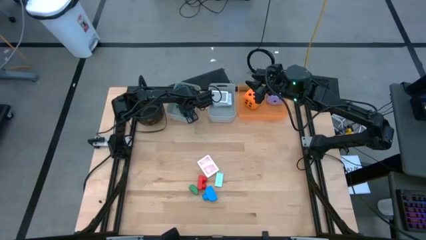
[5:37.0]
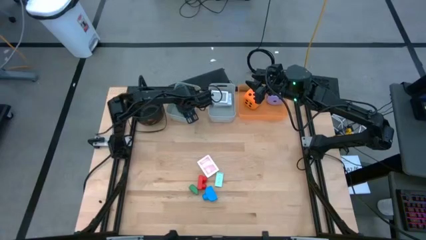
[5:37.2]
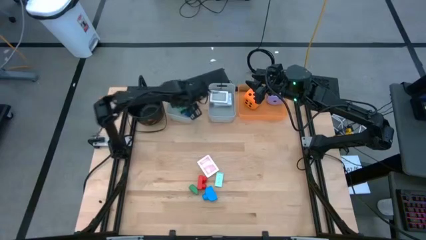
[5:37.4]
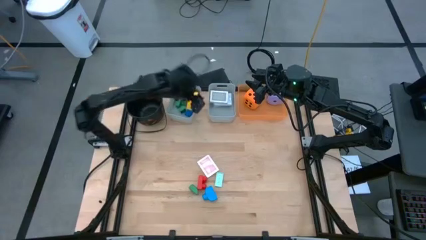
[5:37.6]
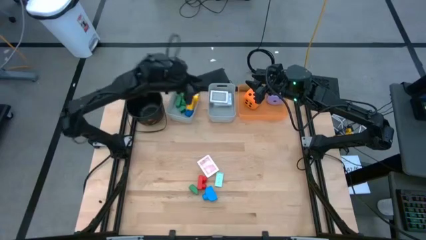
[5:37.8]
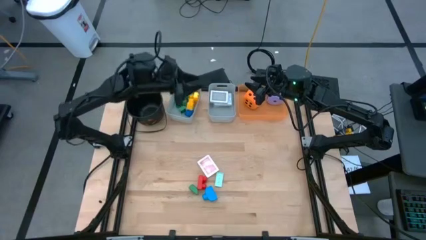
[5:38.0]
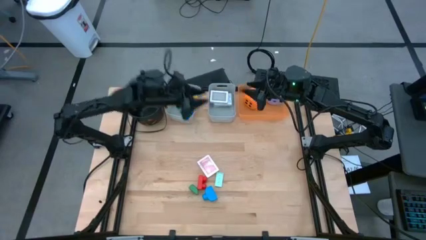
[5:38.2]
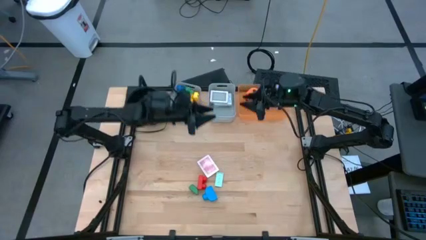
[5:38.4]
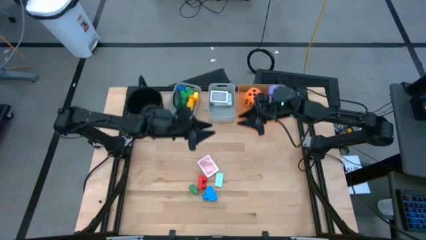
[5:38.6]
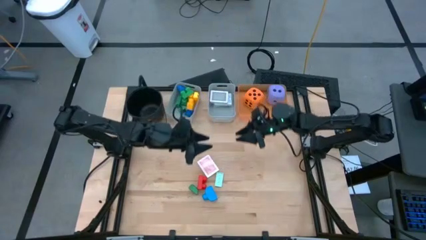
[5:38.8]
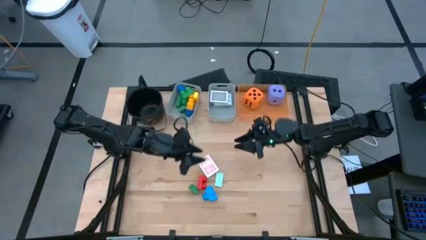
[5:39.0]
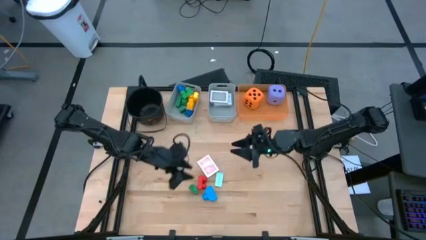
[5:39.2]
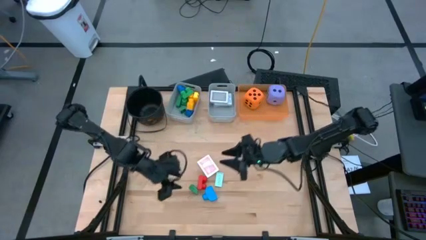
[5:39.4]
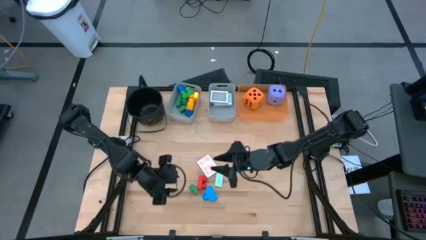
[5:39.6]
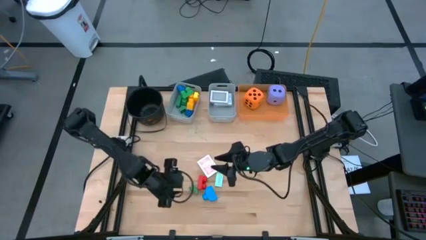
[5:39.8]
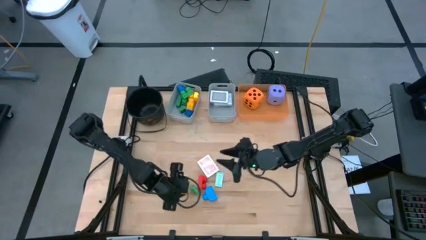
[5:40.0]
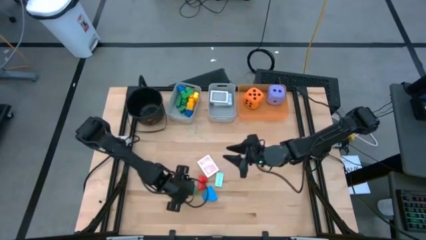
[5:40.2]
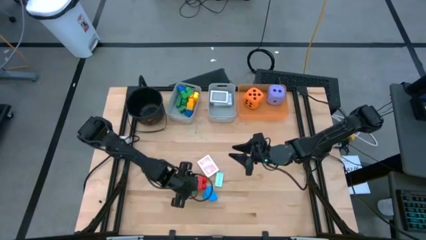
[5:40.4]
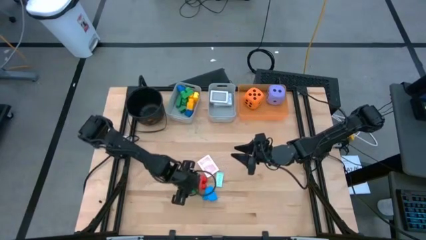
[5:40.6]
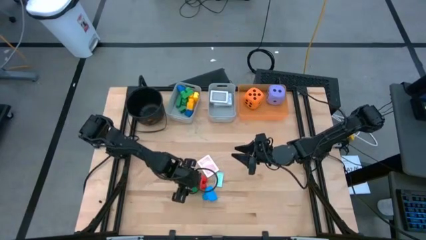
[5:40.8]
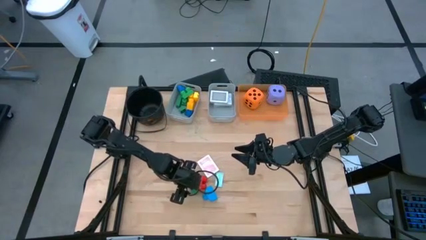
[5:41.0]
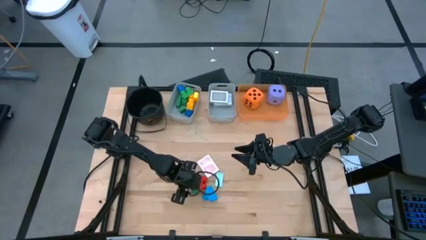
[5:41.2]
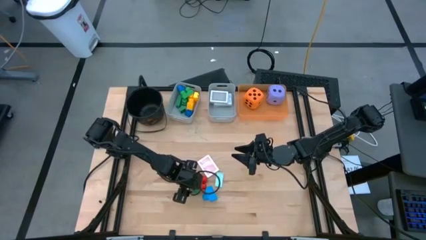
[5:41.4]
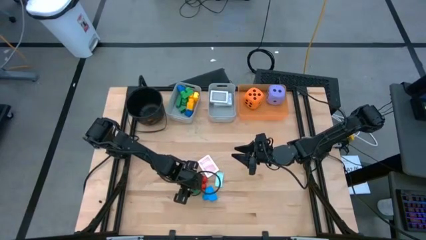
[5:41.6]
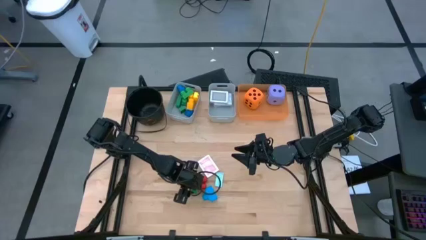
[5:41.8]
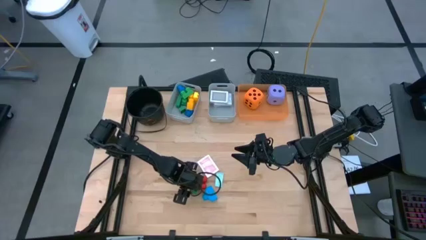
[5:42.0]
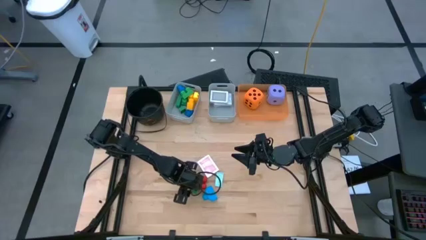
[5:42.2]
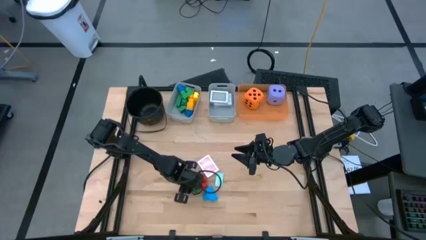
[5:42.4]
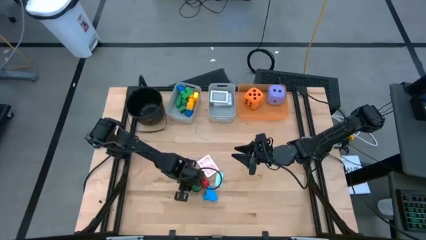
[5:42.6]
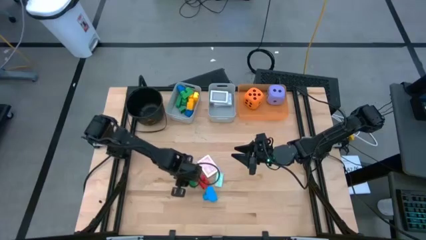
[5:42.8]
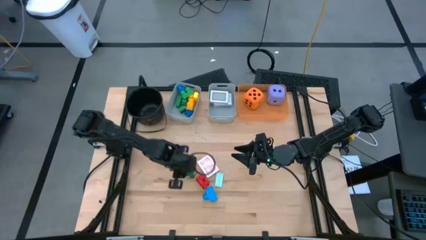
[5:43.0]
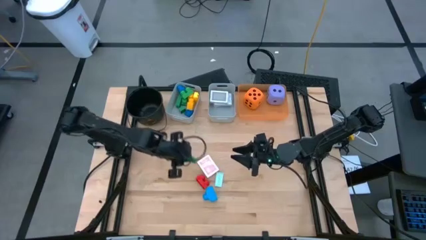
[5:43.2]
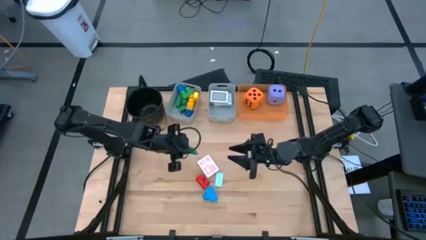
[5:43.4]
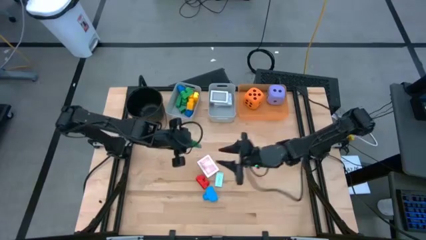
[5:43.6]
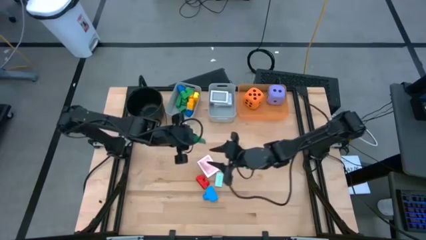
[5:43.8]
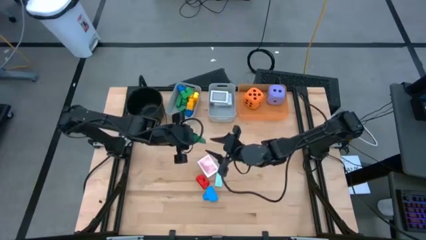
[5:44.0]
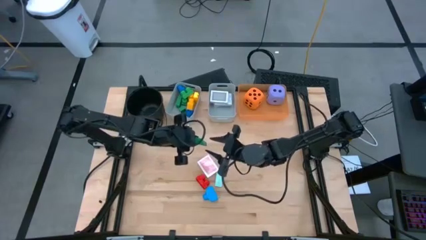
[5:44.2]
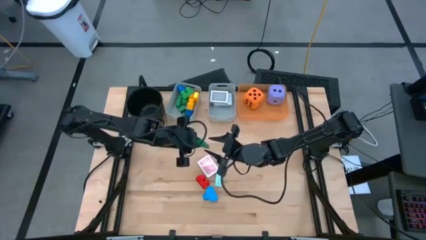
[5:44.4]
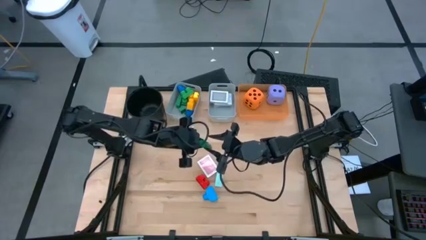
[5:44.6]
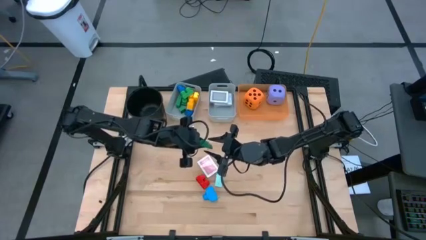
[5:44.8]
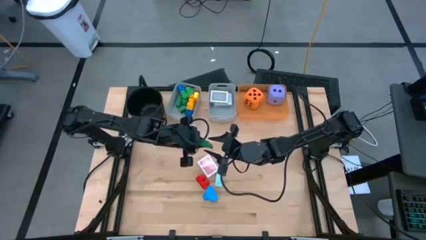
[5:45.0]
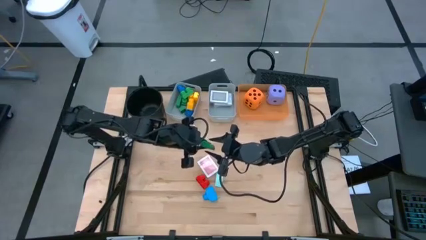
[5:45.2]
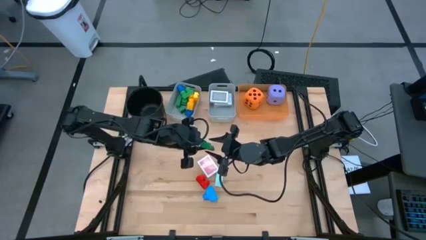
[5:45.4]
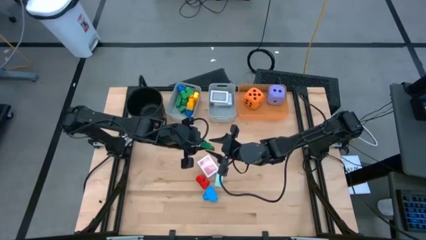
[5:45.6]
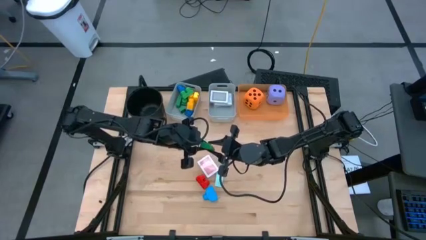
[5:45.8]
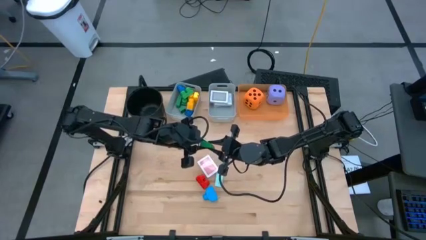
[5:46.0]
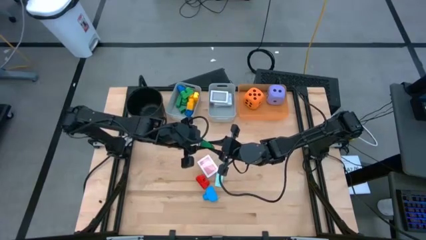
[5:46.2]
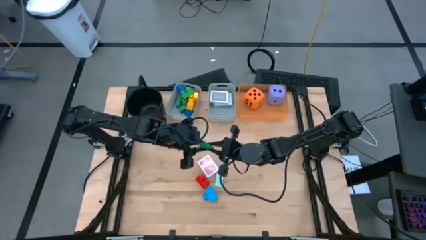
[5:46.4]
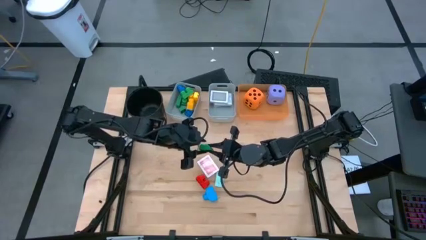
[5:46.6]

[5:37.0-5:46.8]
Task: Pick & Place Toys
Put the green game piece into the left gray bin
